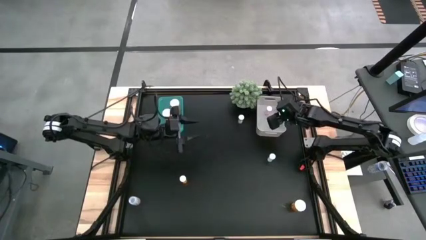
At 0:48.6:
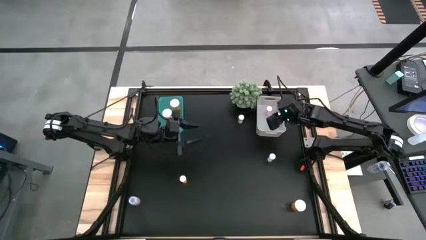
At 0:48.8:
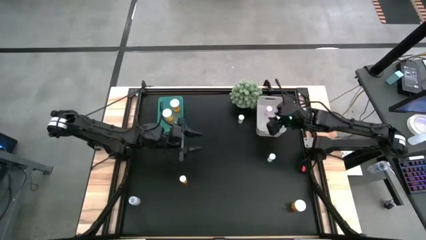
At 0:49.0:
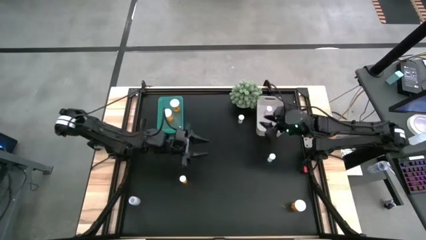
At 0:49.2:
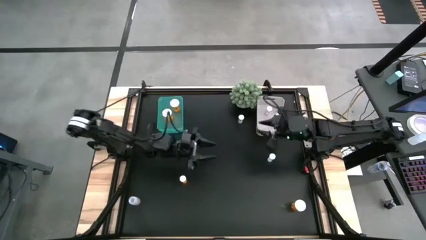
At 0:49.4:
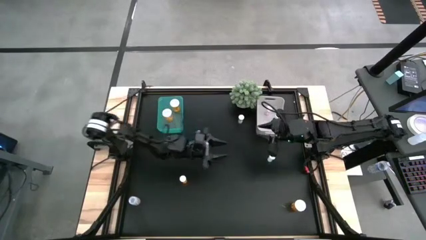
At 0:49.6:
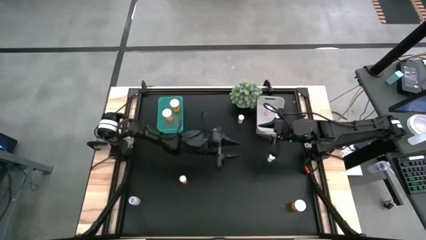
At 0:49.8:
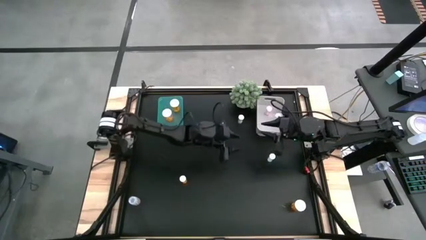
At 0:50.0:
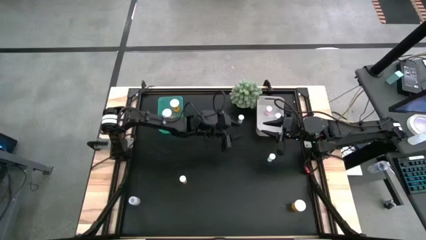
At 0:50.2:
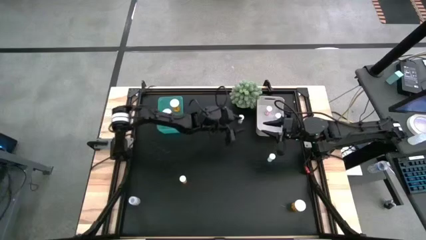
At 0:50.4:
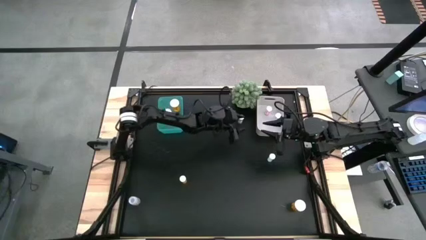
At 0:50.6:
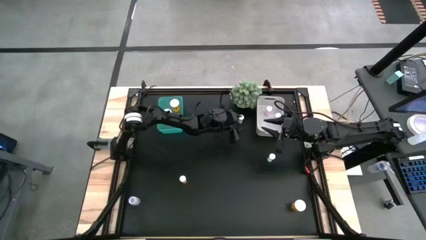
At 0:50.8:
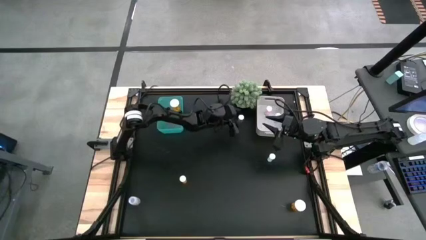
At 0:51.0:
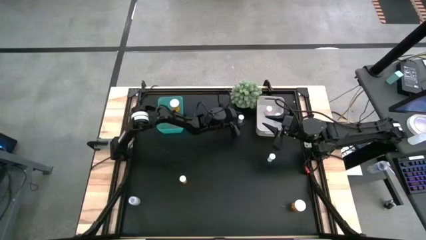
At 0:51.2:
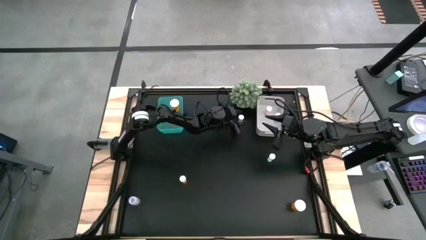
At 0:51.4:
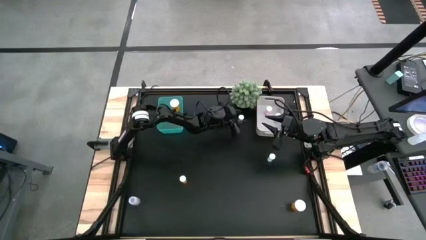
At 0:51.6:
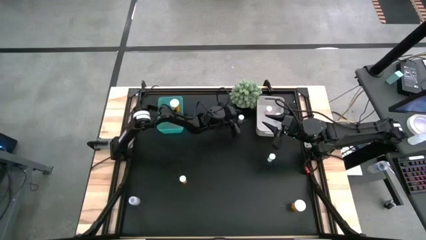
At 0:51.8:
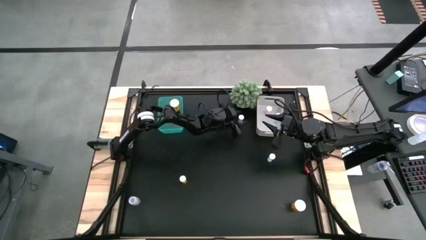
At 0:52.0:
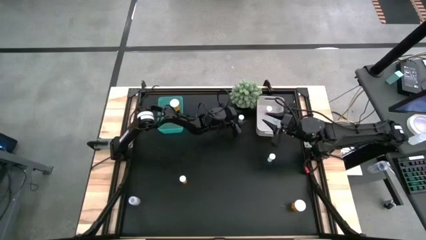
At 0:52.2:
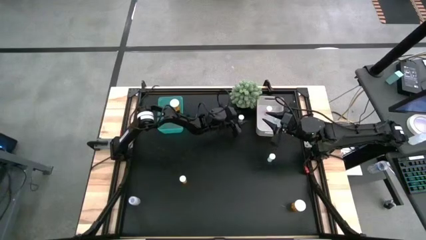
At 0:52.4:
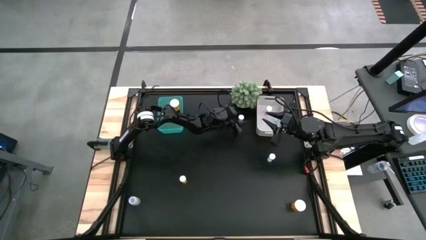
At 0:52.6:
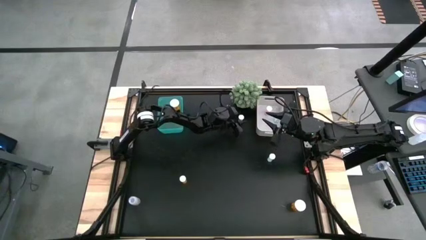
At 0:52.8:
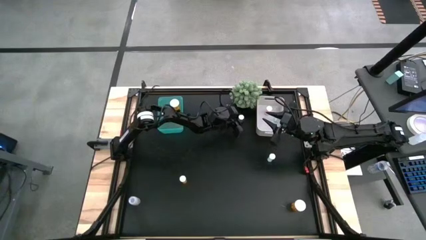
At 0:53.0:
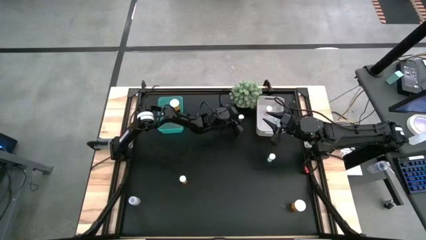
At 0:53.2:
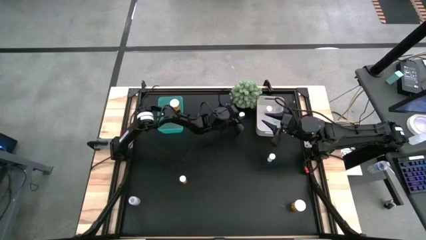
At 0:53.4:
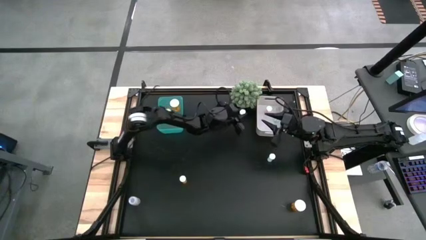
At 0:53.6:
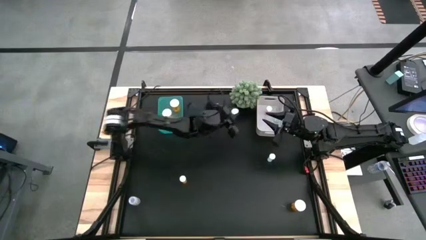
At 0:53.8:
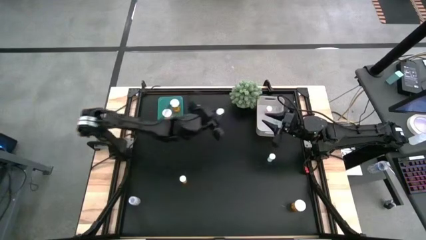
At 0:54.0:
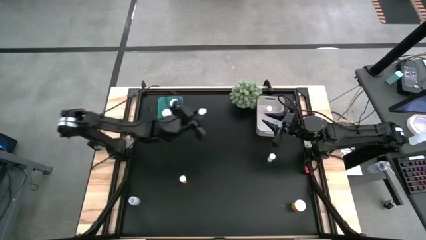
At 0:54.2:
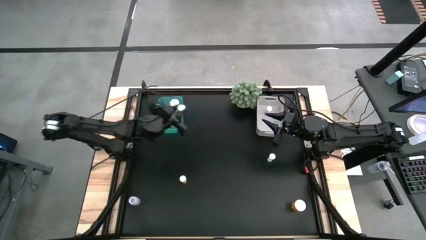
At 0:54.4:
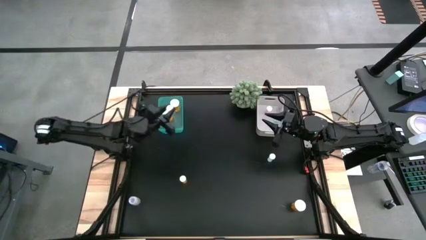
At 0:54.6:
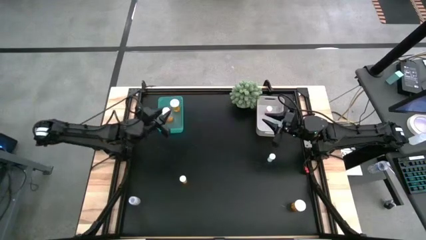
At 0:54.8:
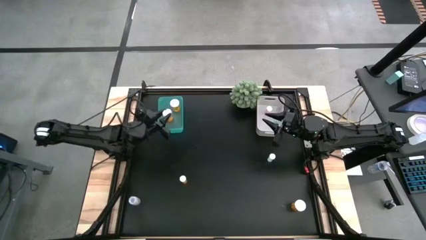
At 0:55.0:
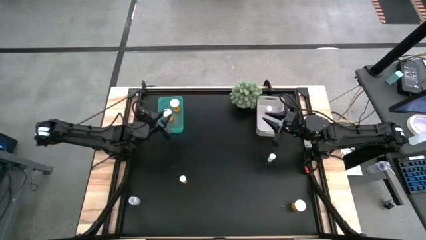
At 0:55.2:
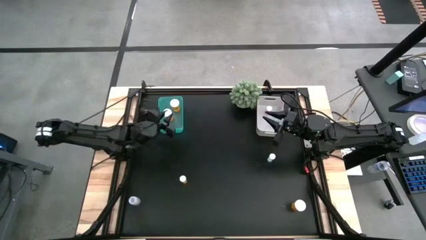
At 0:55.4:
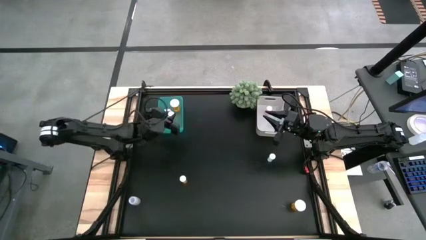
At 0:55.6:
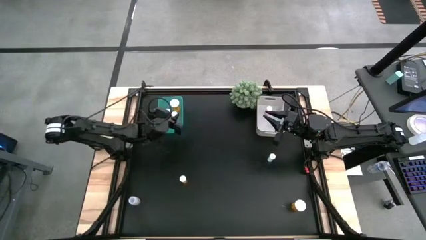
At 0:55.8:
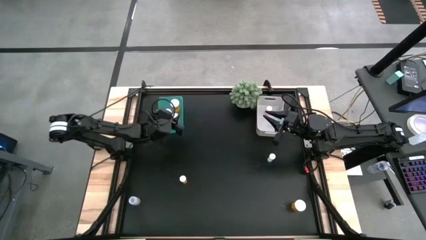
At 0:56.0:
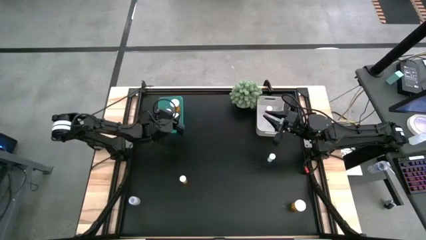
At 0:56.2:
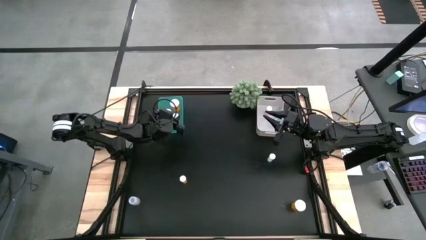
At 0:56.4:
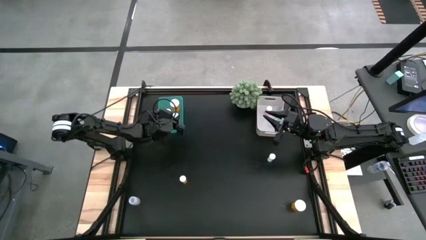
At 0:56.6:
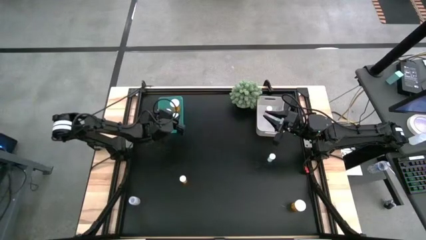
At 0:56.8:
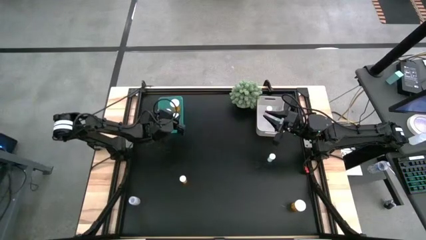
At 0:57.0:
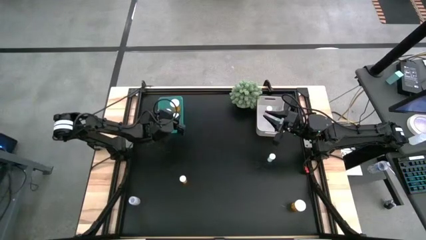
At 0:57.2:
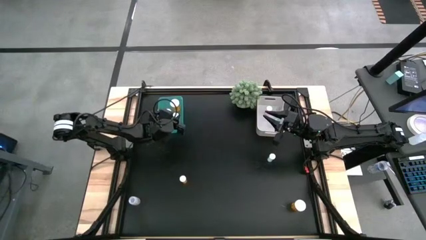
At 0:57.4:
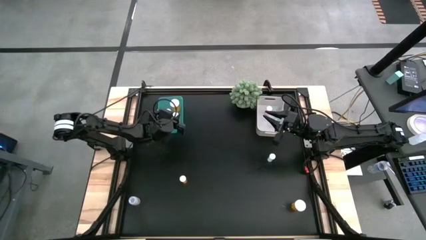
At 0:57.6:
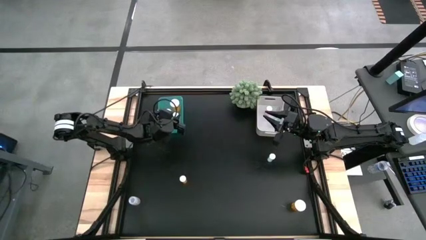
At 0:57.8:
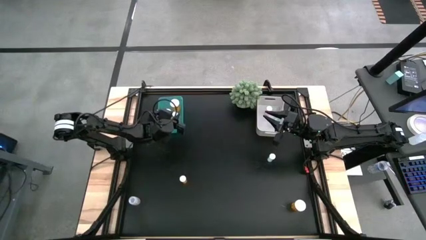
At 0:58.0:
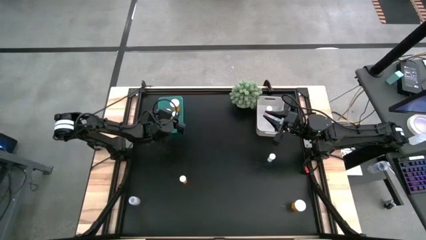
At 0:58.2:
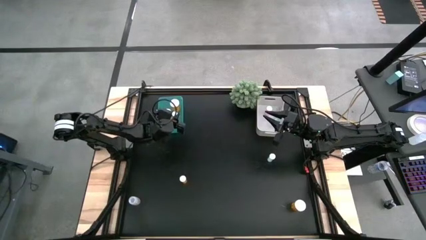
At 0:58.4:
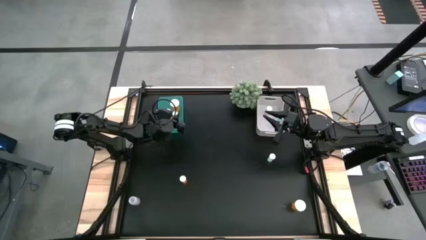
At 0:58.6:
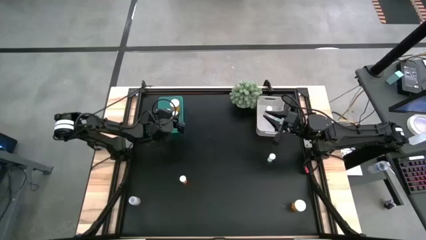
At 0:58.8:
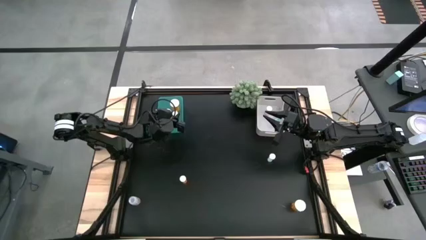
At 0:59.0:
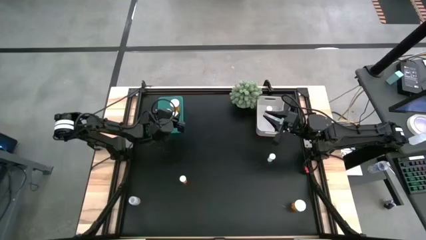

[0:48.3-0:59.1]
Task: Pick and place medicine bottles into bin by pill shape (circle, oval)
Put the blue capsule bottle into the green bin

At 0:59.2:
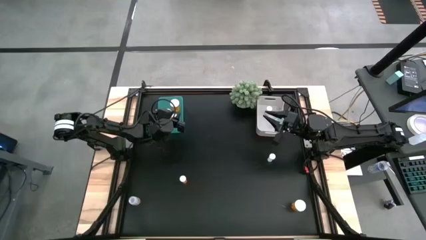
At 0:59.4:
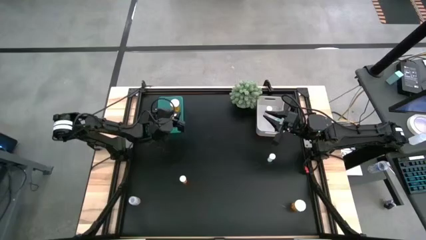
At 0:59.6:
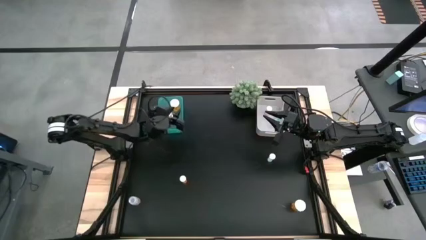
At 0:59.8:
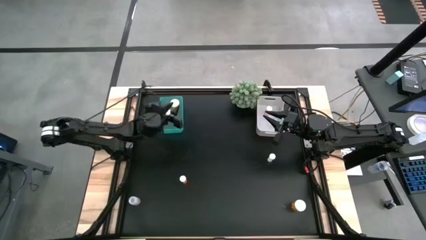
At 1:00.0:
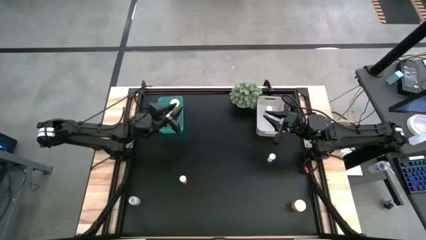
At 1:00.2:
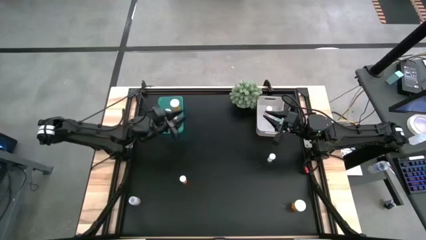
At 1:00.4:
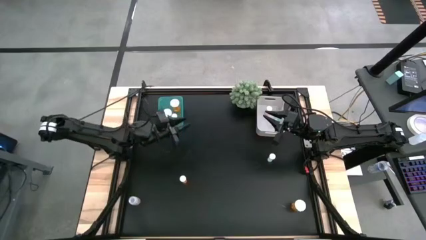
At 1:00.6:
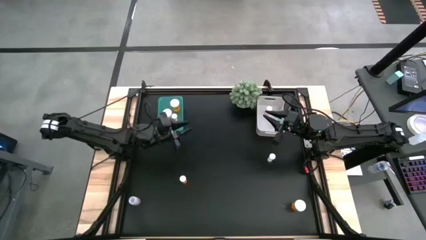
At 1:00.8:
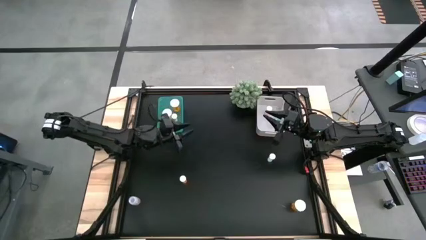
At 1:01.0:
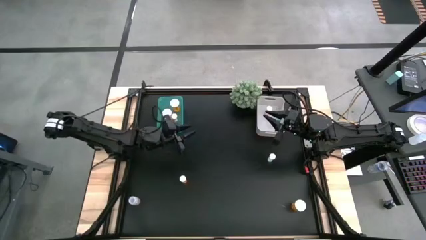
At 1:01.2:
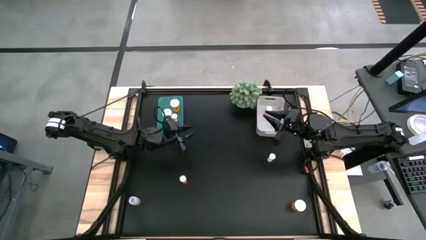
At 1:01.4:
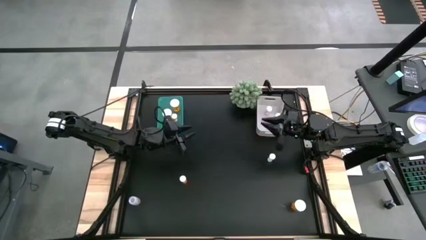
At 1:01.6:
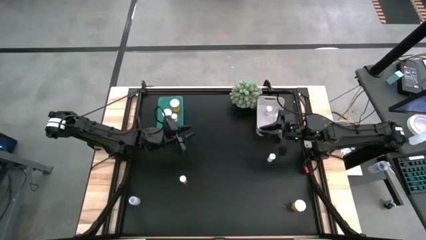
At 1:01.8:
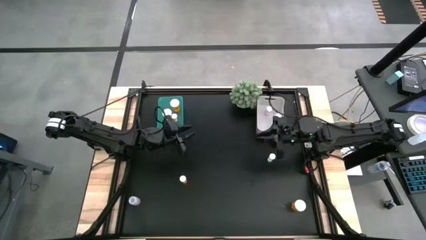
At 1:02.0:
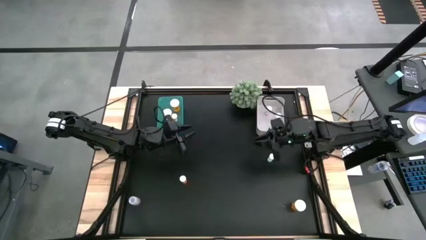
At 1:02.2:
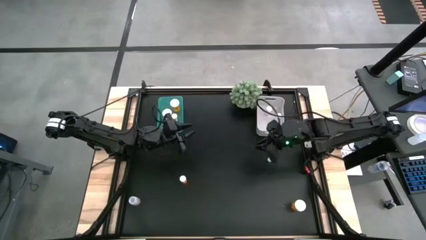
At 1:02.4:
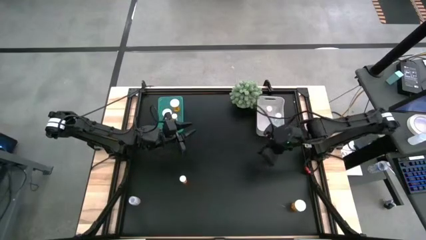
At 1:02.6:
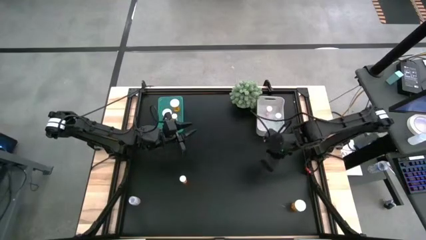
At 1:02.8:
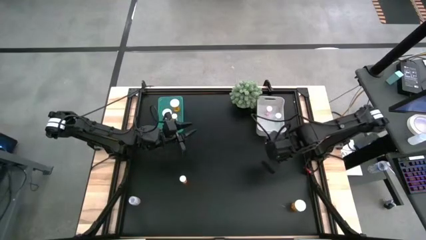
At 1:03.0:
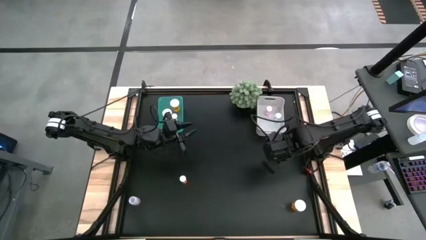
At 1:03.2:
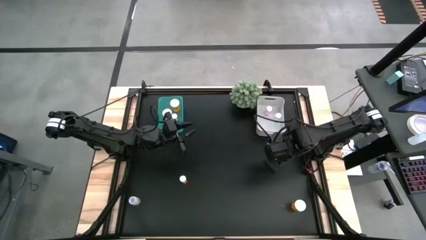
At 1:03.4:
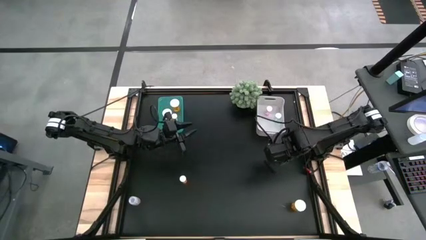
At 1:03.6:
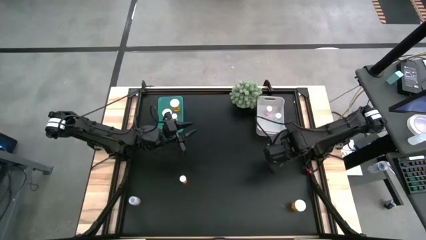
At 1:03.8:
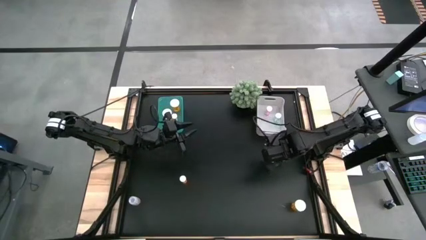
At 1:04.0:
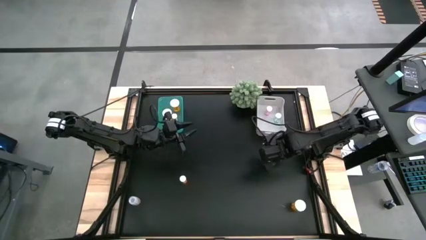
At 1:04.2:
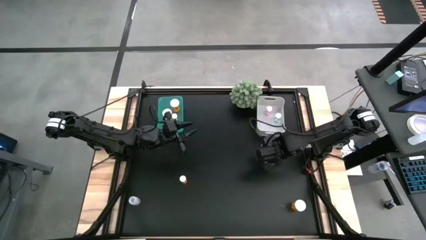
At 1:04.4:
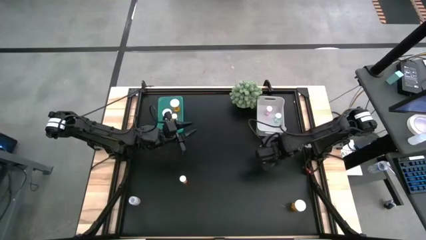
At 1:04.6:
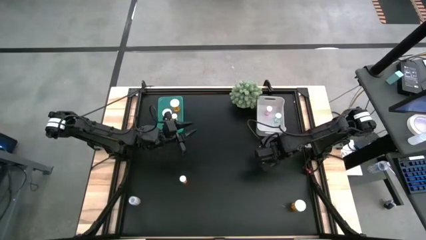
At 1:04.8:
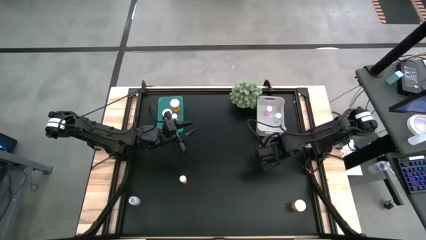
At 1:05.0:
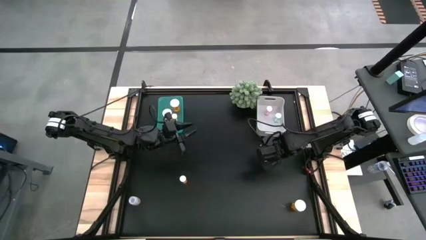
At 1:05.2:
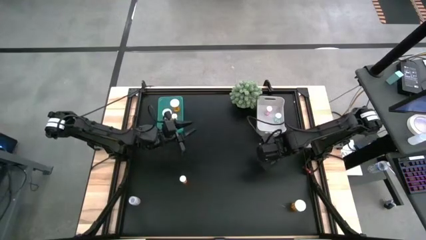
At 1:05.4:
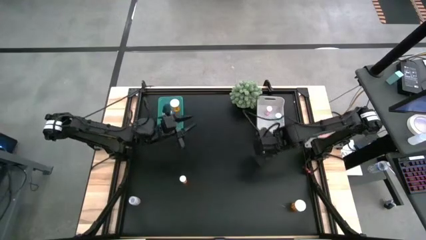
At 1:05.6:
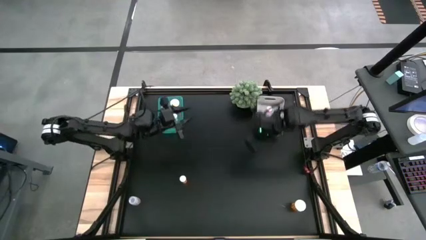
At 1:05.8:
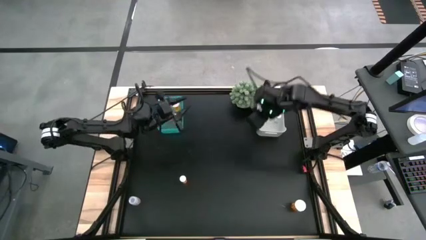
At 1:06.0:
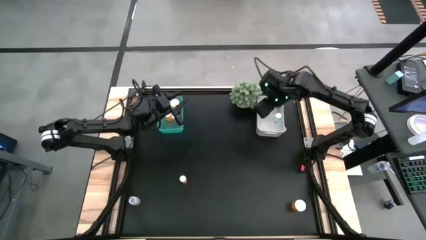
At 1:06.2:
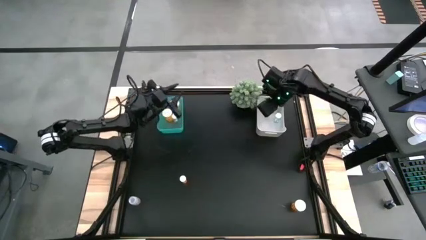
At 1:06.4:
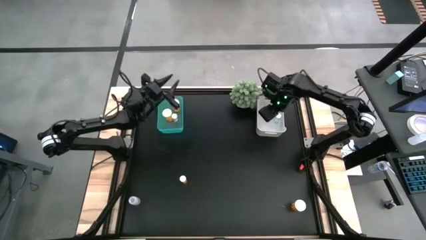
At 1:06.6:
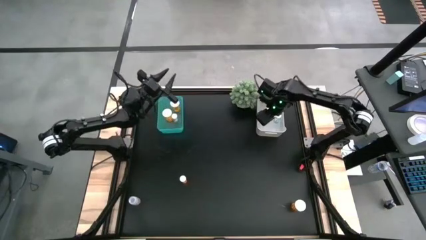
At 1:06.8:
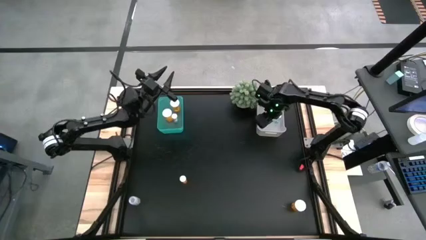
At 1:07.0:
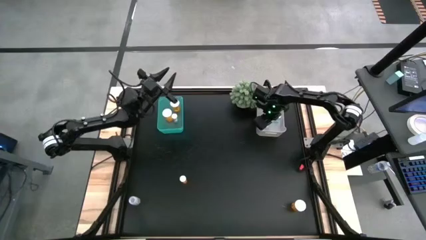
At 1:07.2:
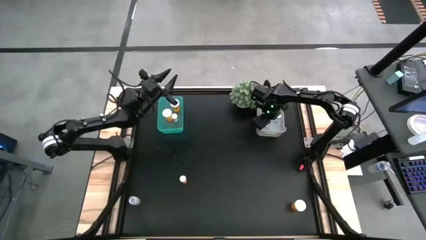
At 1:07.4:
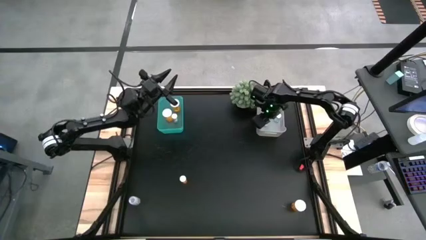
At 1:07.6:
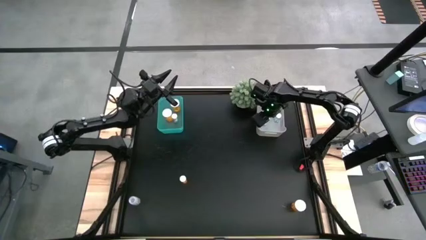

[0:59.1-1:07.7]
Put the blue tablet bottle into the white bin
